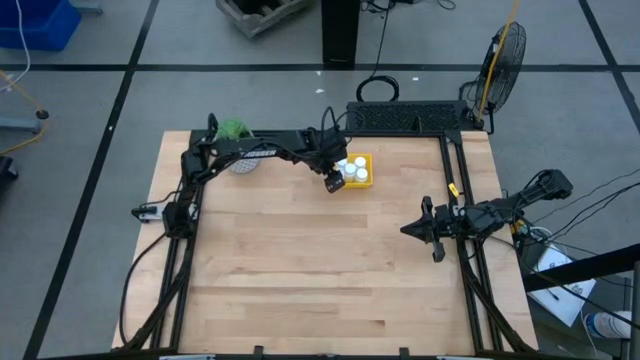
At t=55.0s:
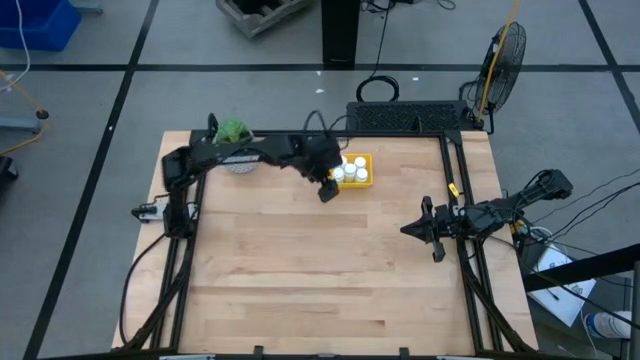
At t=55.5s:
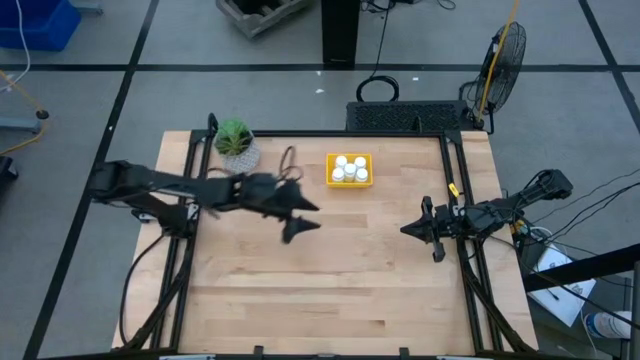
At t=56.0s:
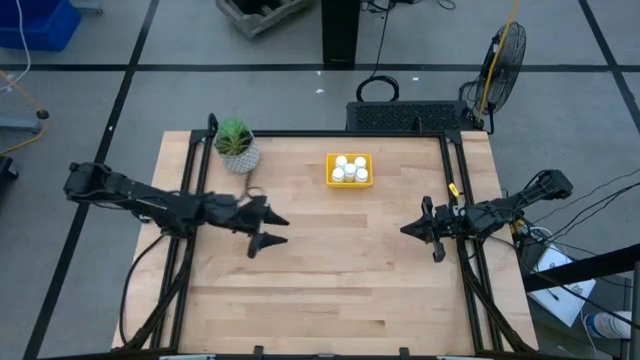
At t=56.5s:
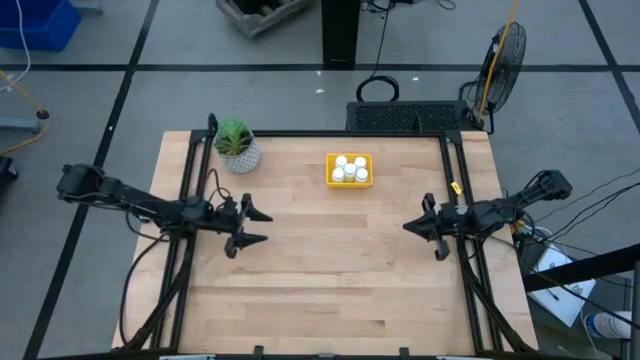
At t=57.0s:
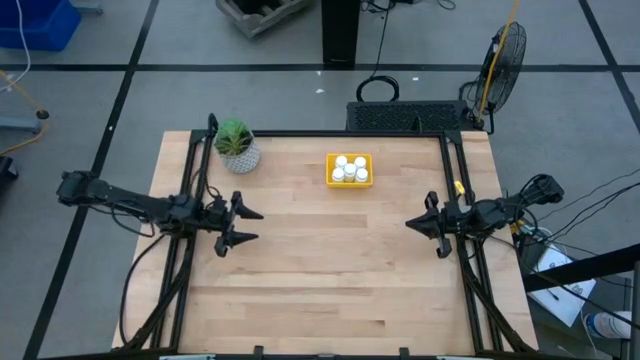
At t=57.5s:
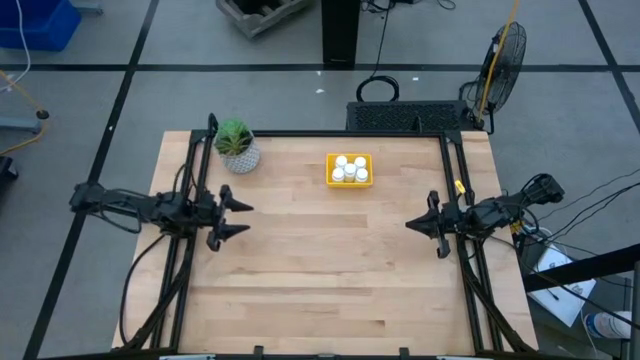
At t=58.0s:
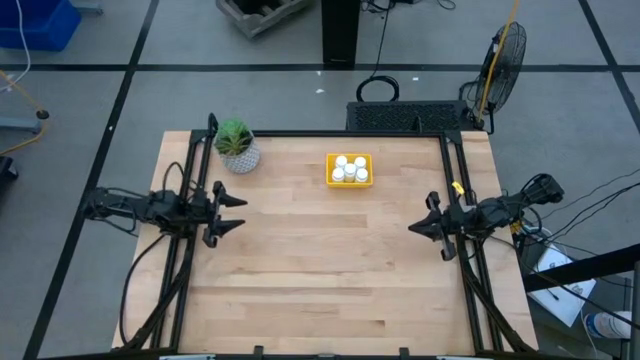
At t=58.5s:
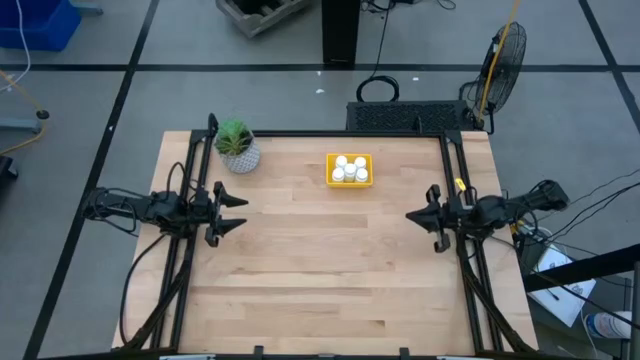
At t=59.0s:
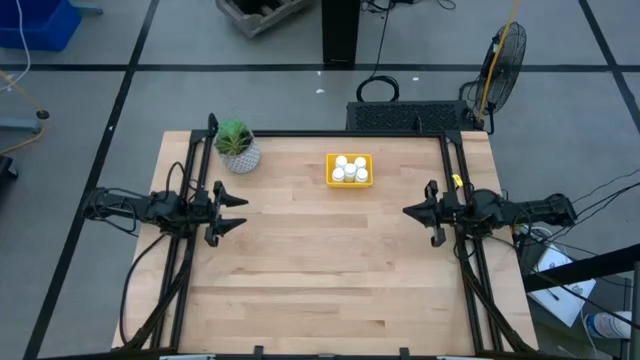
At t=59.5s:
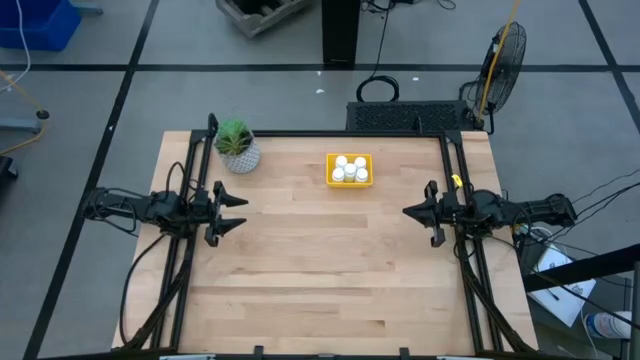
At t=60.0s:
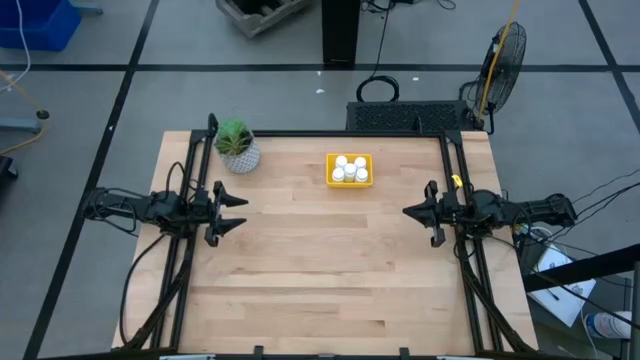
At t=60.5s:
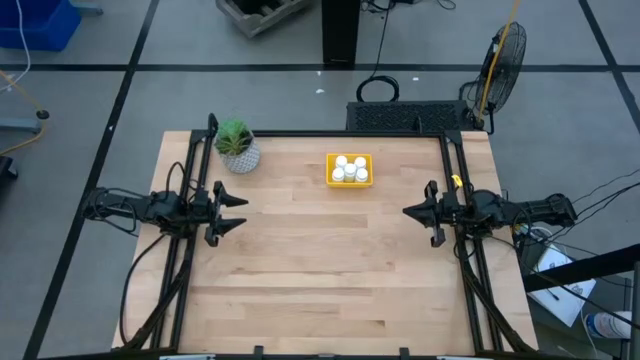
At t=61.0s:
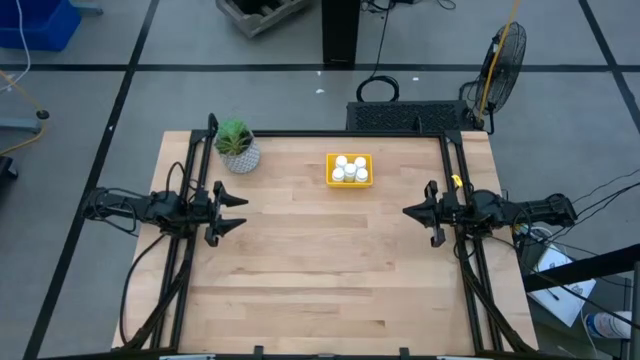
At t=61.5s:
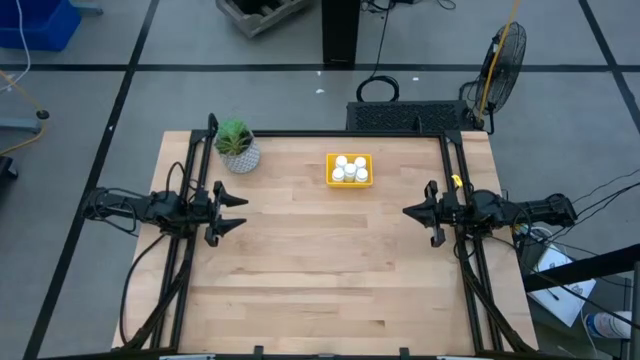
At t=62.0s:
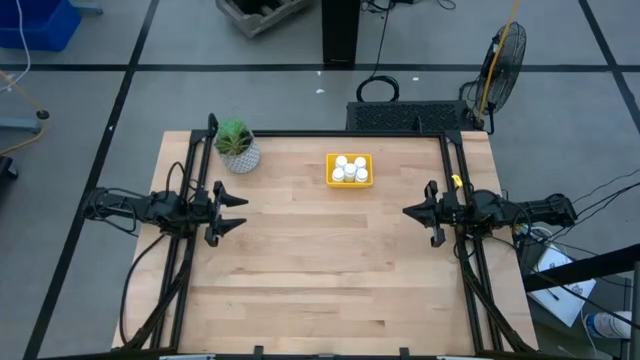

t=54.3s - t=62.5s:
Task: Pick and place pill bottles into a basket
Return to Home Position

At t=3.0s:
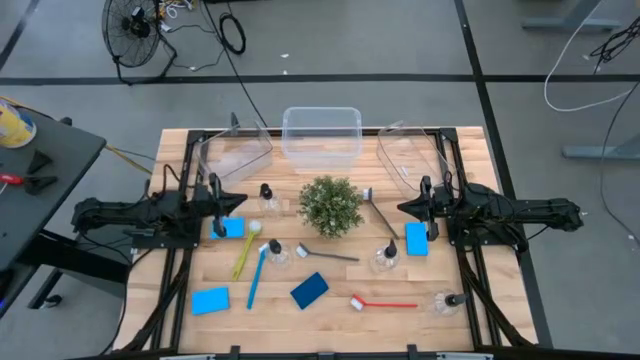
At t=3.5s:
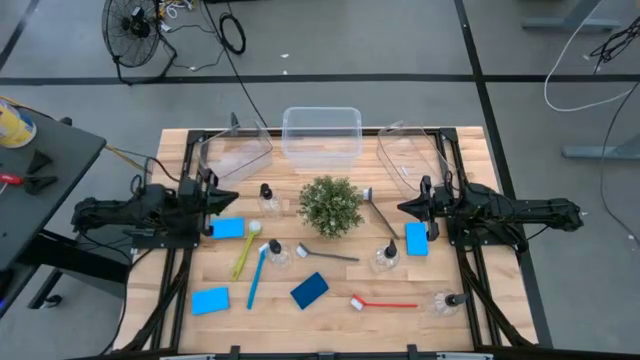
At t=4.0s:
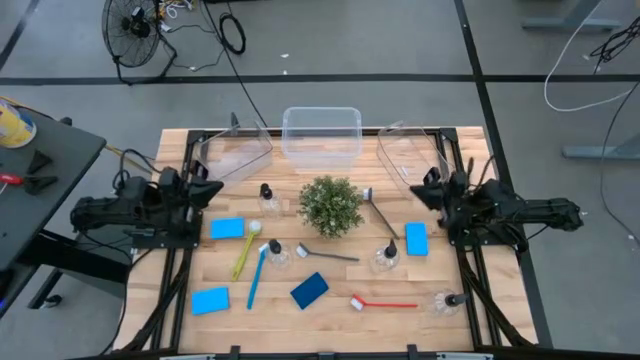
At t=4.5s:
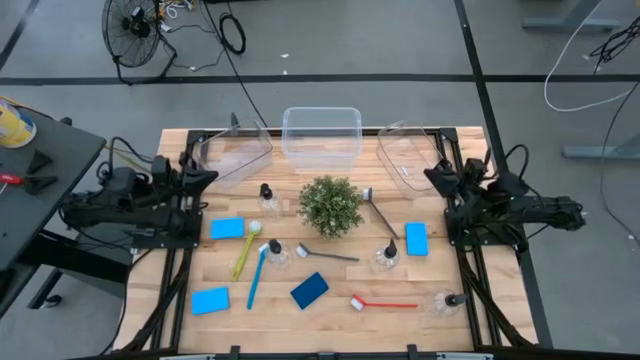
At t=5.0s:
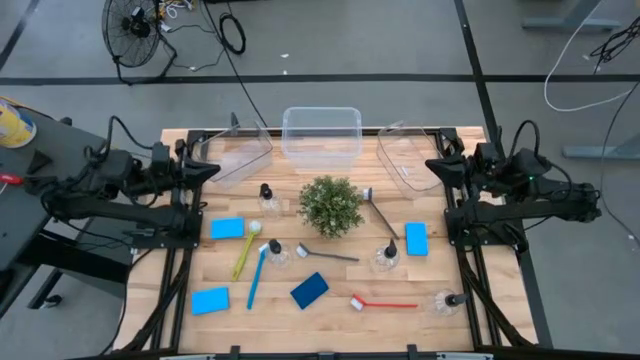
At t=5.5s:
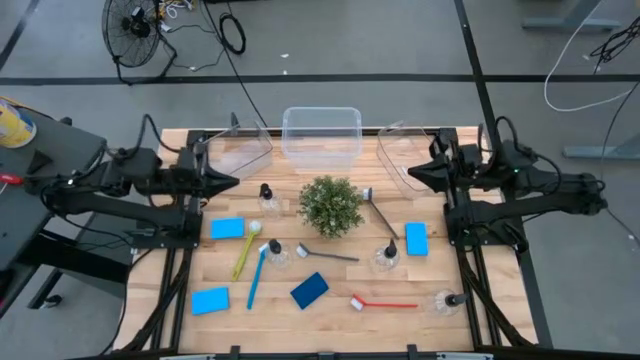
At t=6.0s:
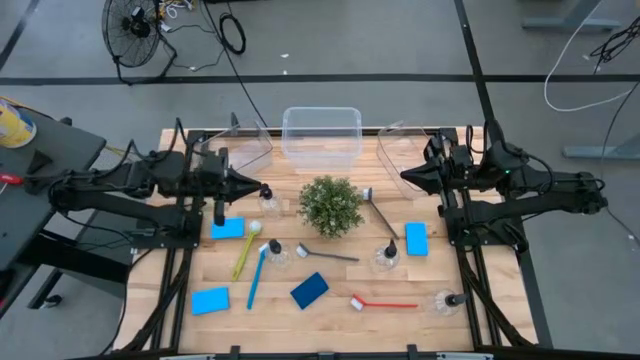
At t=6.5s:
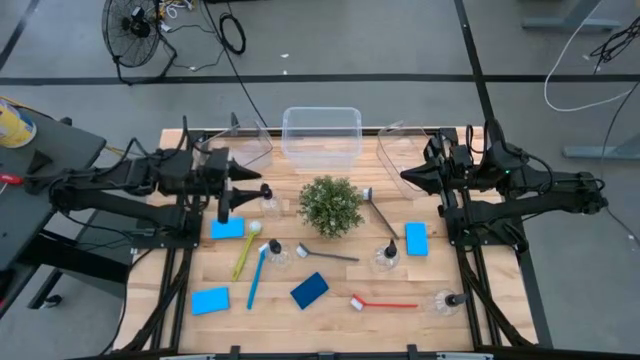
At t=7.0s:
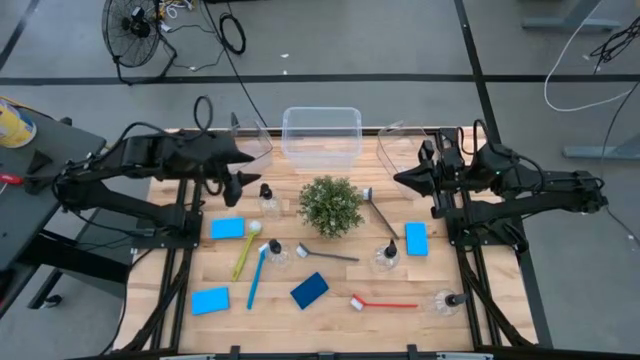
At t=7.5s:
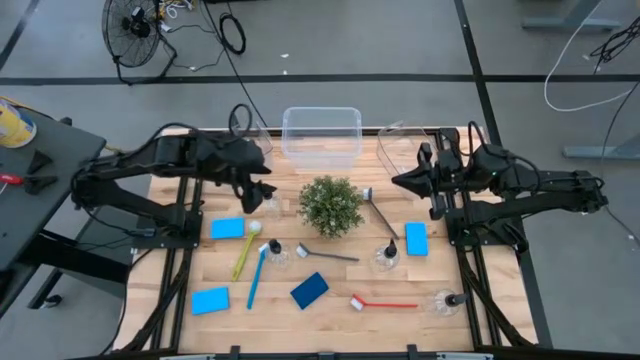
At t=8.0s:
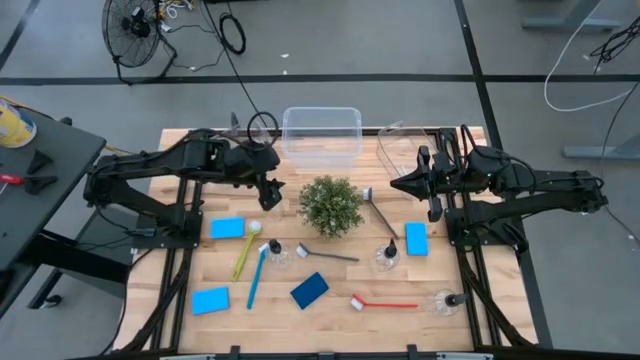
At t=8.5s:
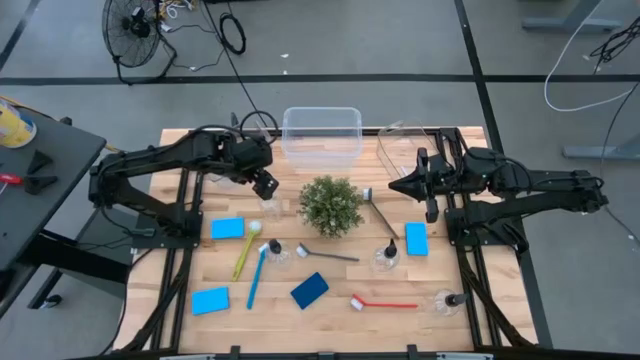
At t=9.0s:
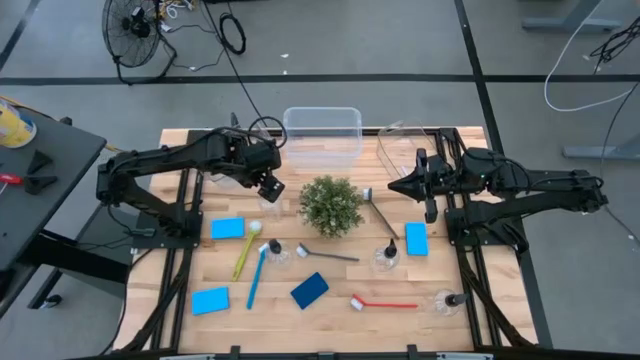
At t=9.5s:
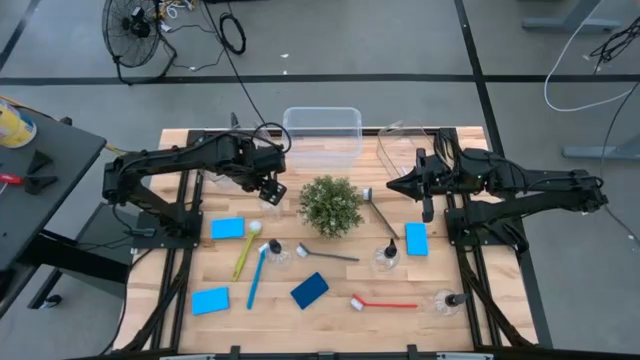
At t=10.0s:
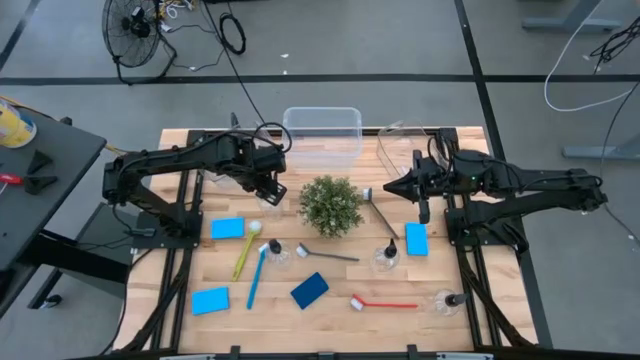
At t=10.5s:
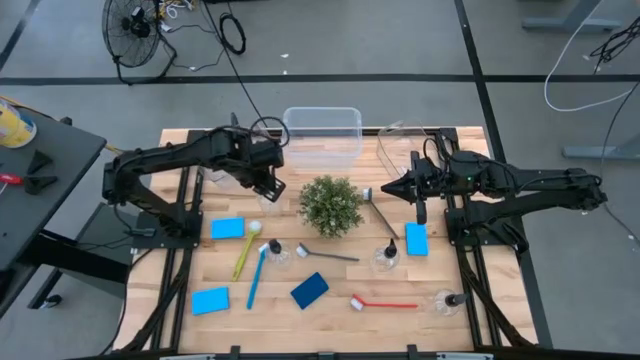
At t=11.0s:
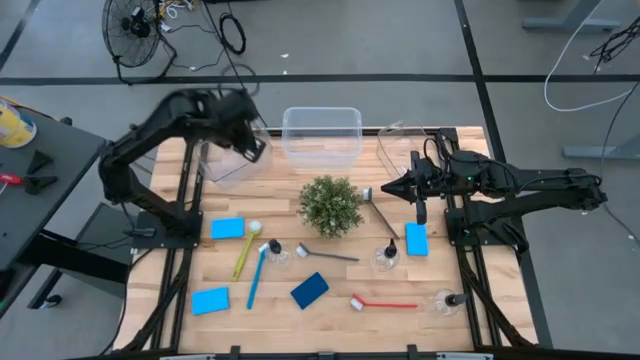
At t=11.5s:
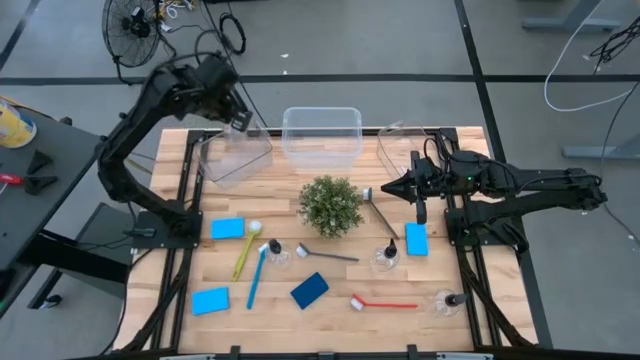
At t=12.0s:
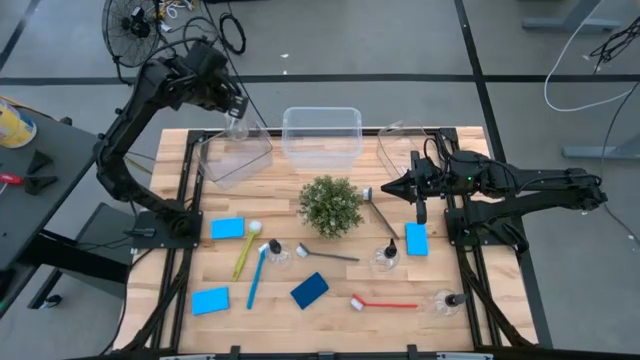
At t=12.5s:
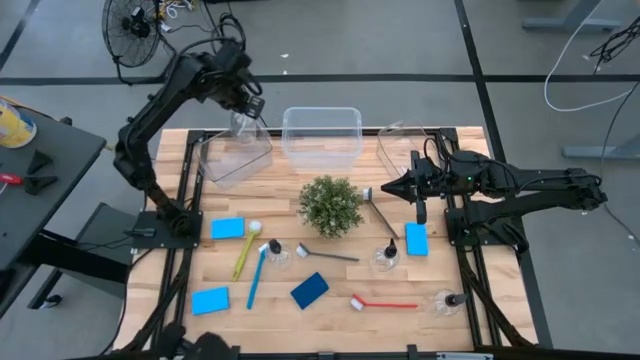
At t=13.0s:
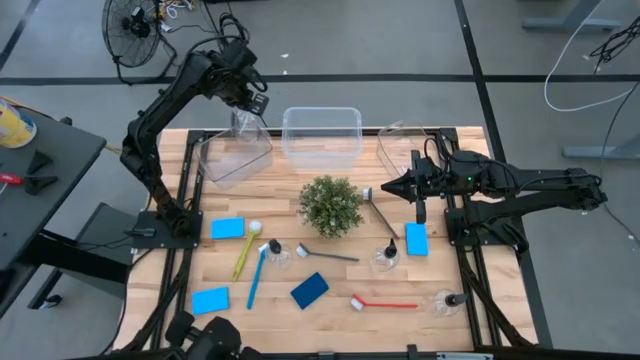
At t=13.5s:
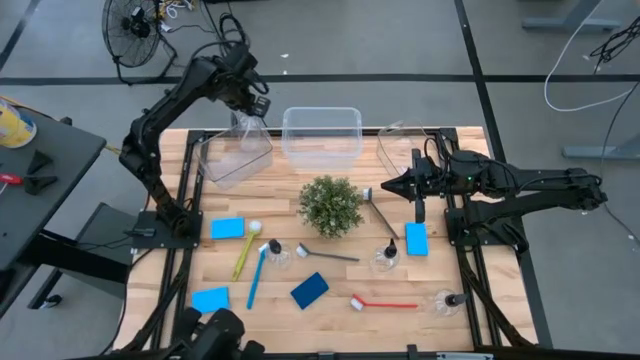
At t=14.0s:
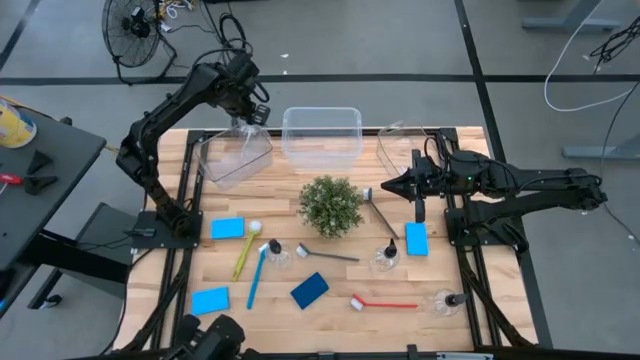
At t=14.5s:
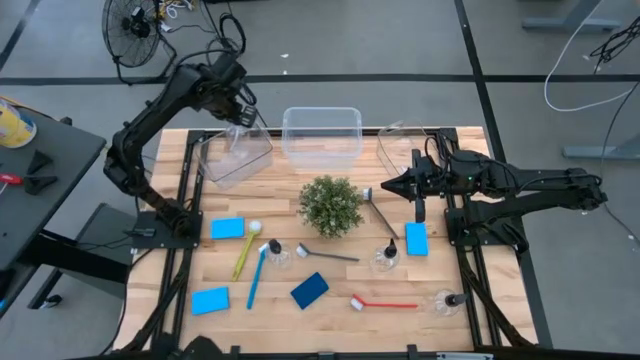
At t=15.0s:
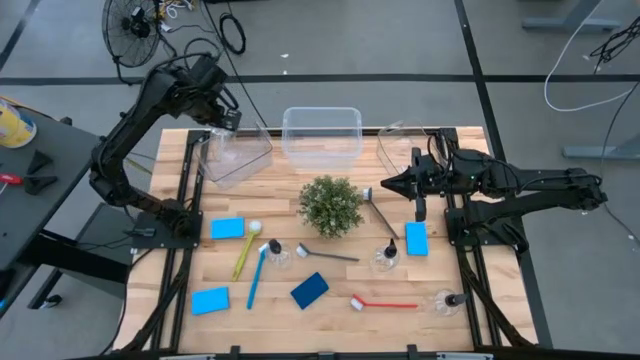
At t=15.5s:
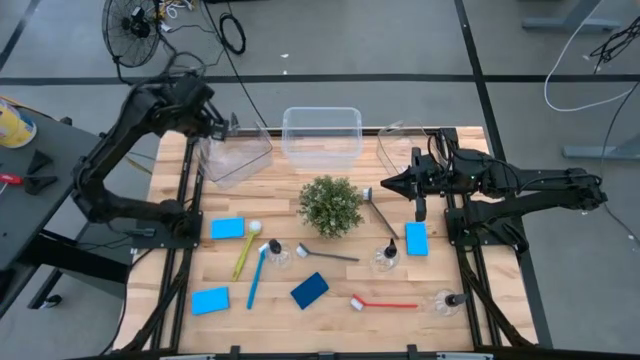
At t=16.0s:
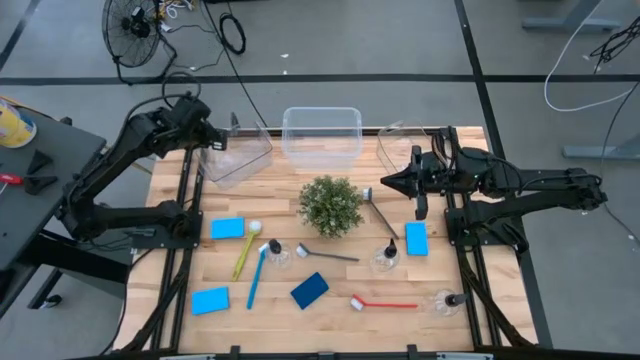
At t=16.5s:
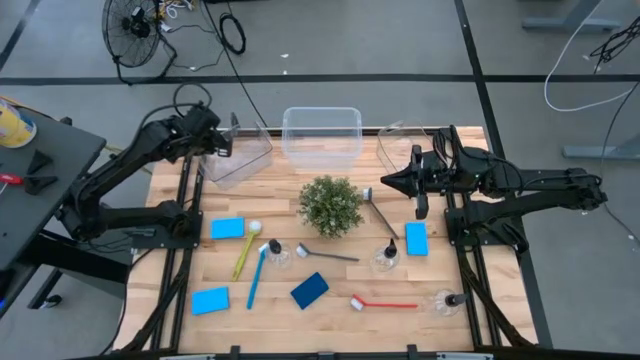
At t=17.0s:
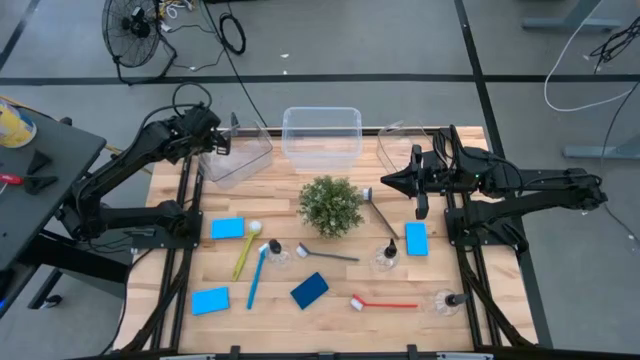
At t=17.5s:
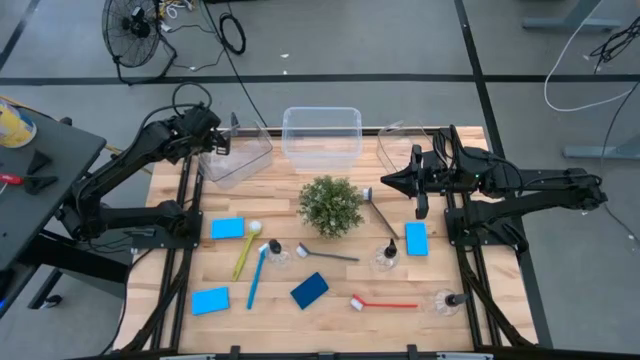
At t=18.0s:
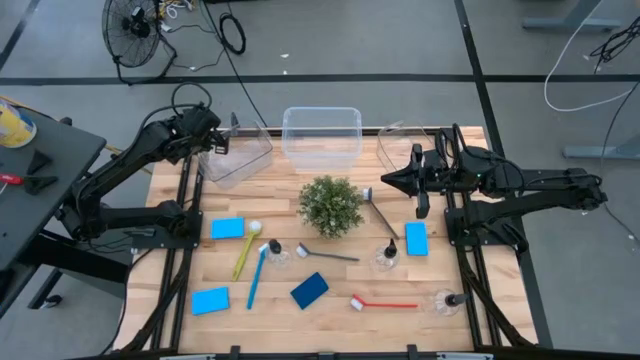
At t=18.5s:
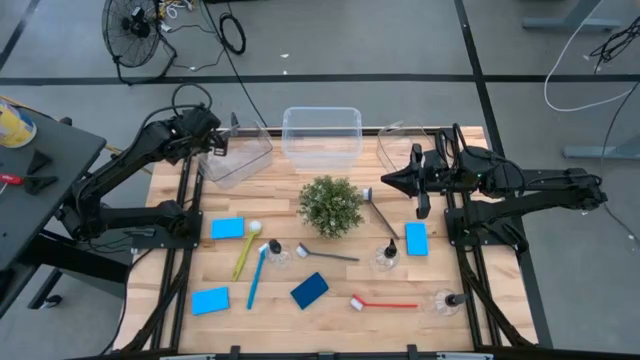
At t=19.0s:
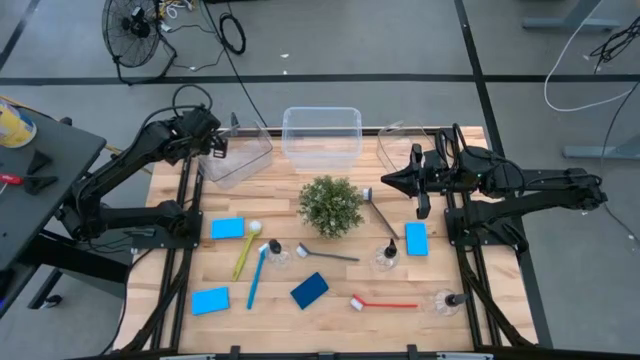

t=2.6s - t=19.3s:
Task: Pick & Place Kitchen Sink Supplies
Put the transparent soap dispenser into the left transparent bin
